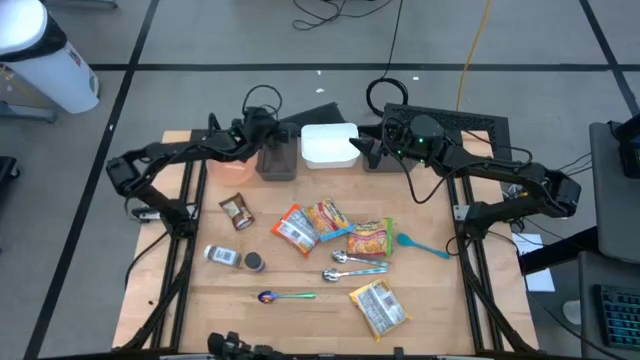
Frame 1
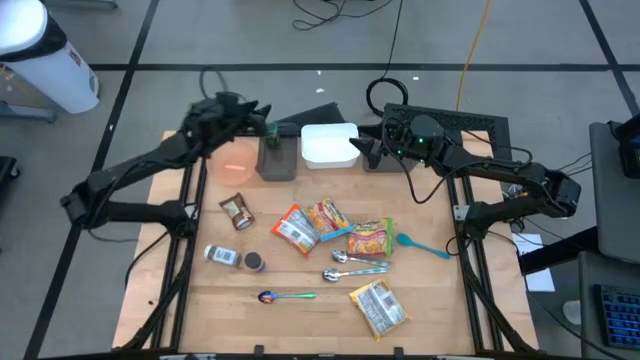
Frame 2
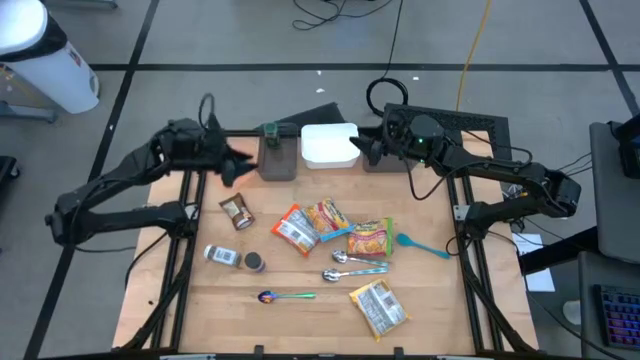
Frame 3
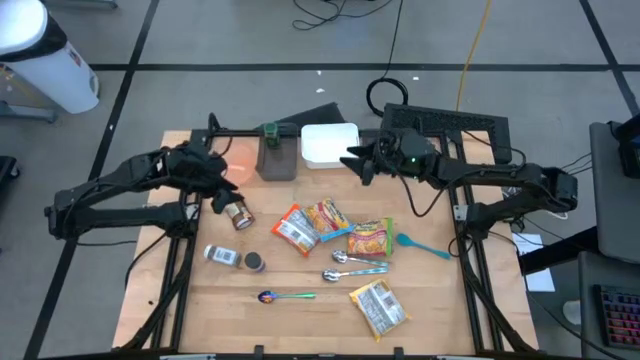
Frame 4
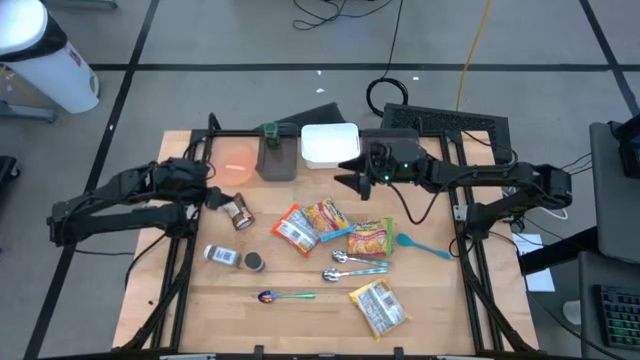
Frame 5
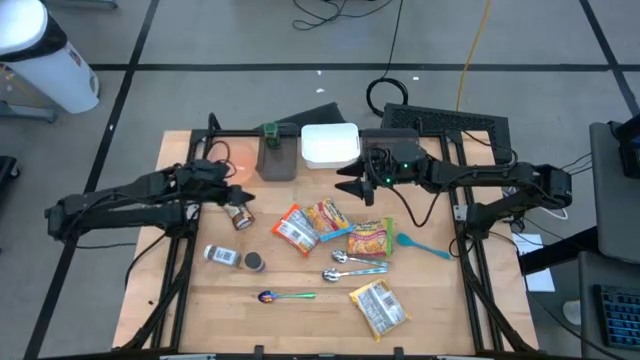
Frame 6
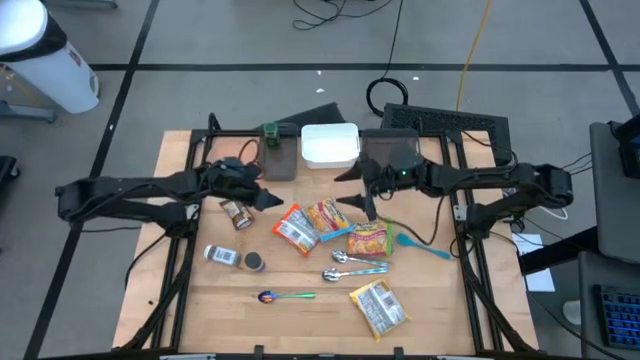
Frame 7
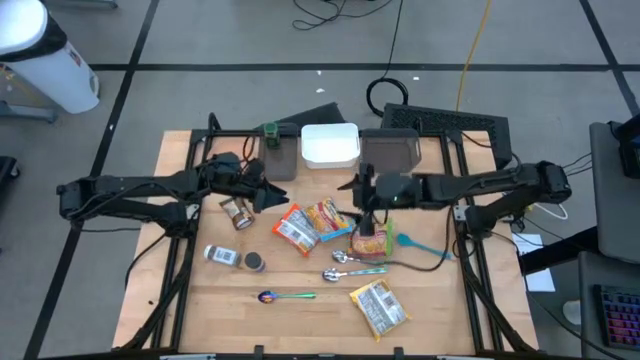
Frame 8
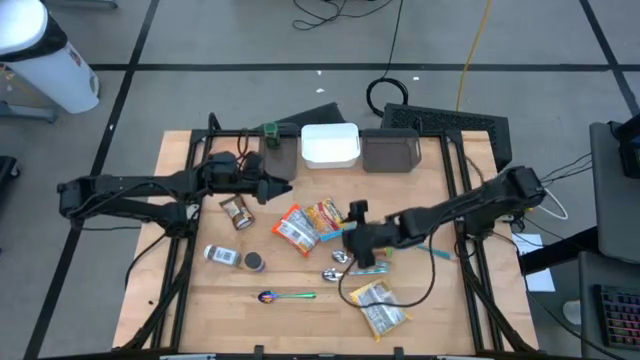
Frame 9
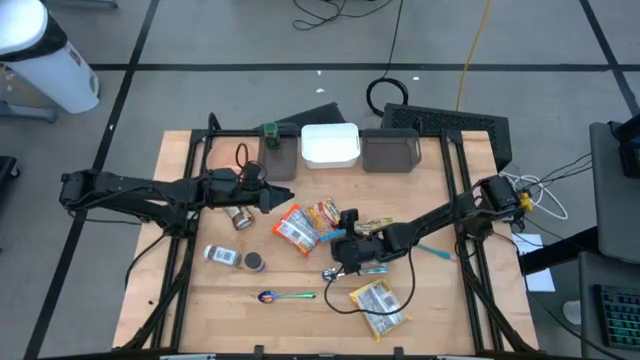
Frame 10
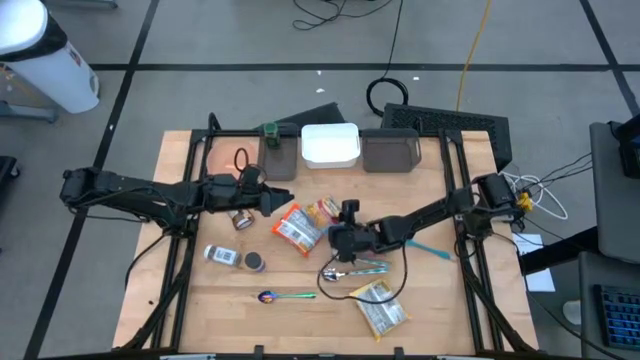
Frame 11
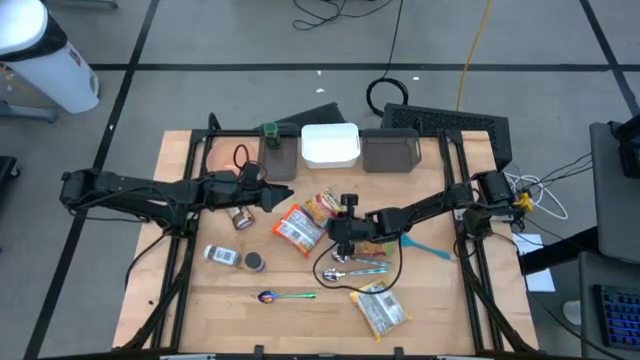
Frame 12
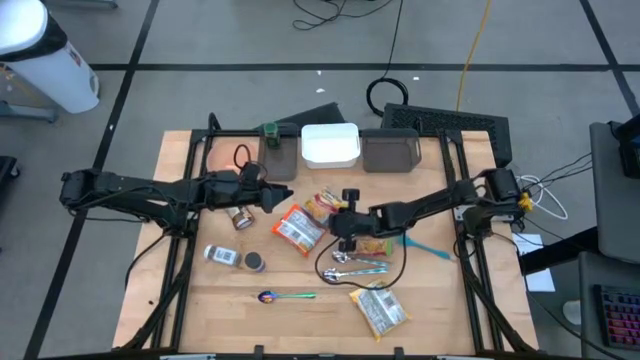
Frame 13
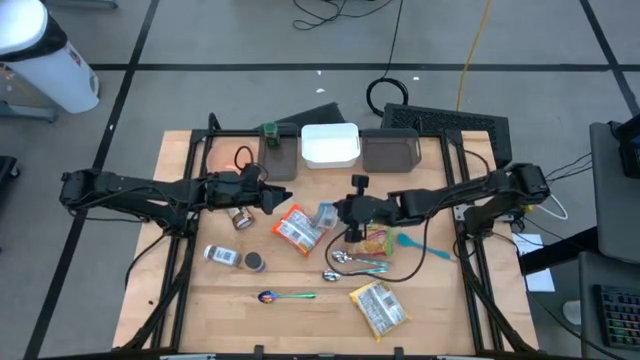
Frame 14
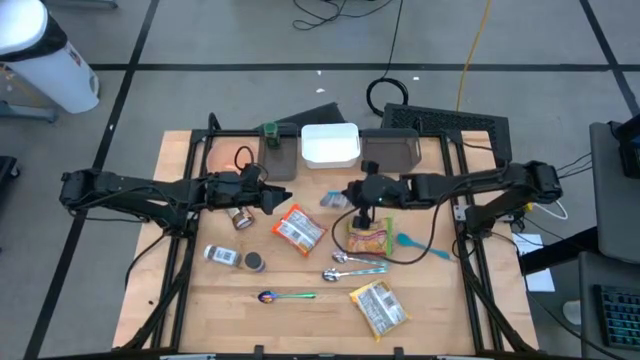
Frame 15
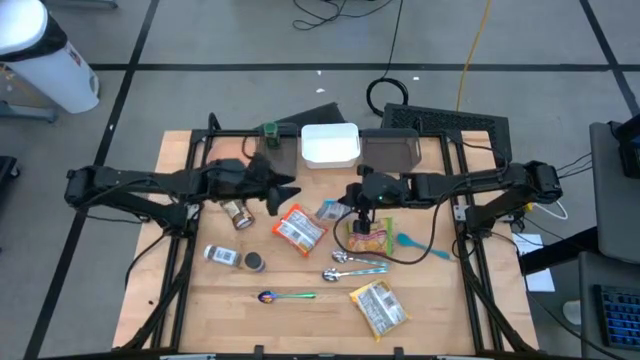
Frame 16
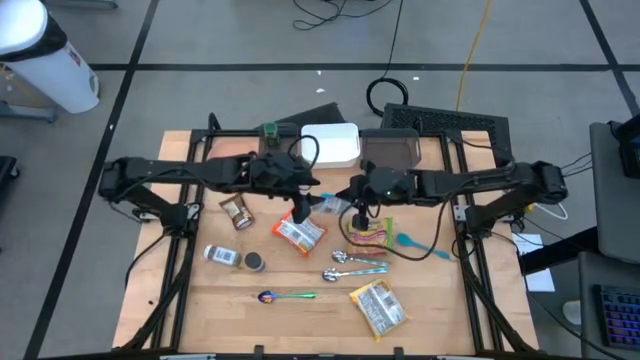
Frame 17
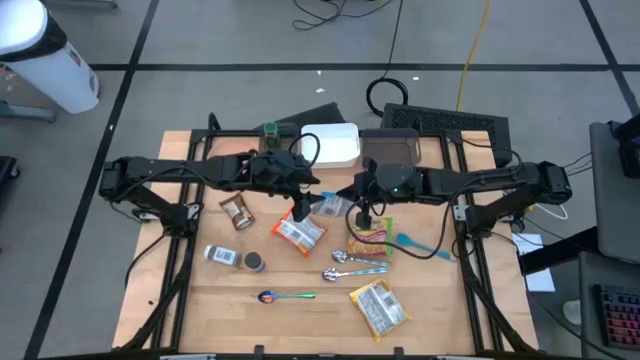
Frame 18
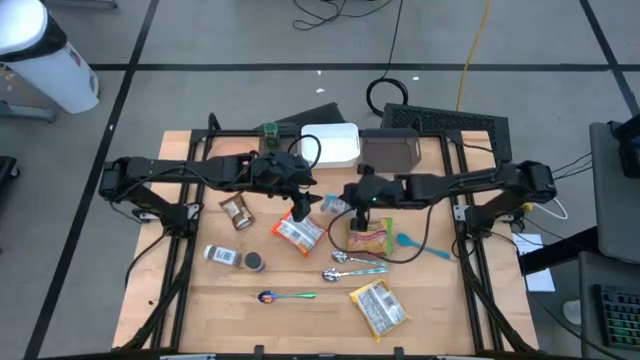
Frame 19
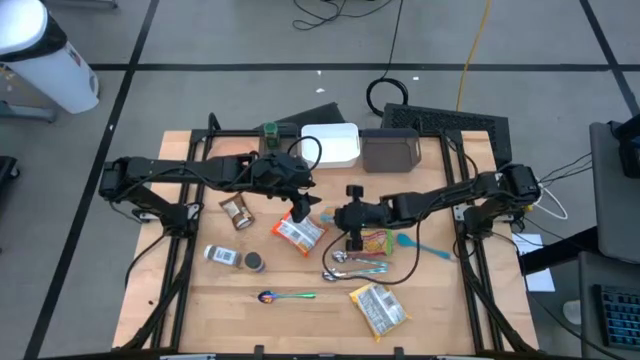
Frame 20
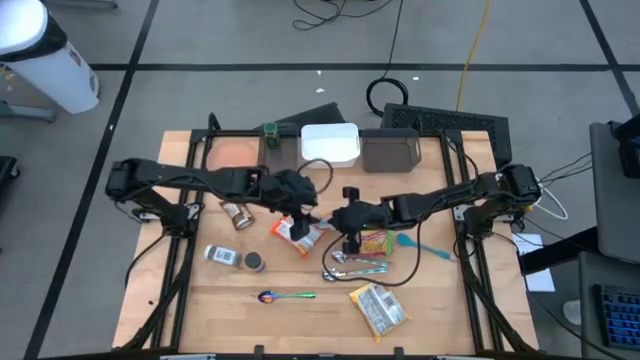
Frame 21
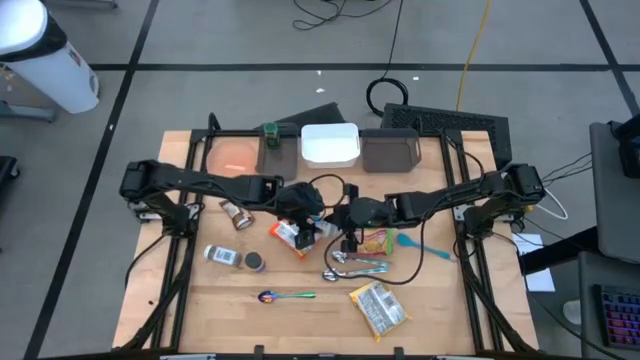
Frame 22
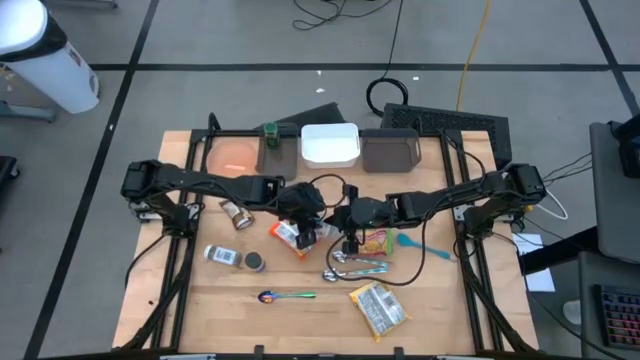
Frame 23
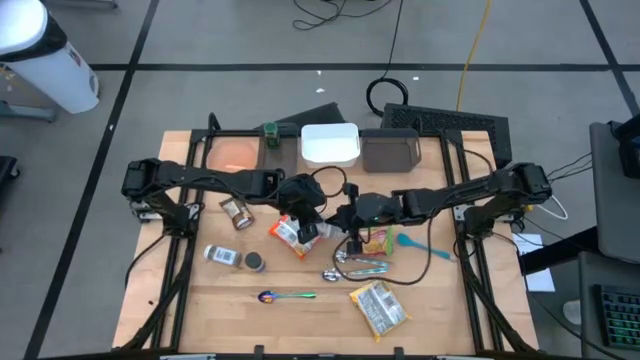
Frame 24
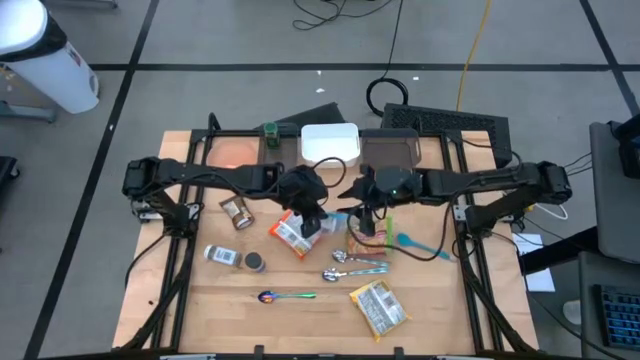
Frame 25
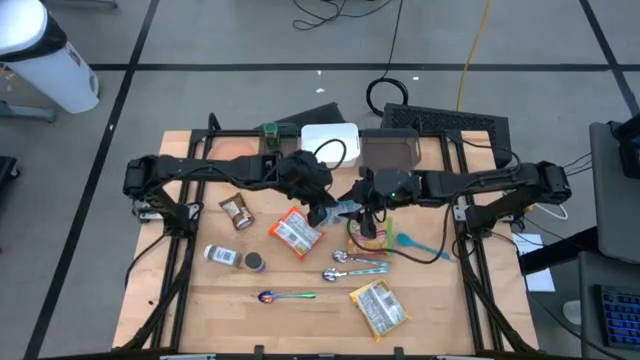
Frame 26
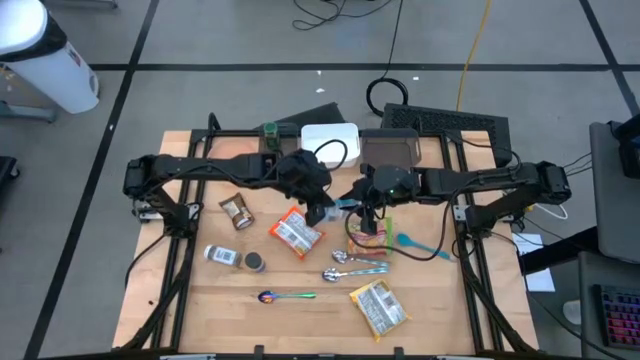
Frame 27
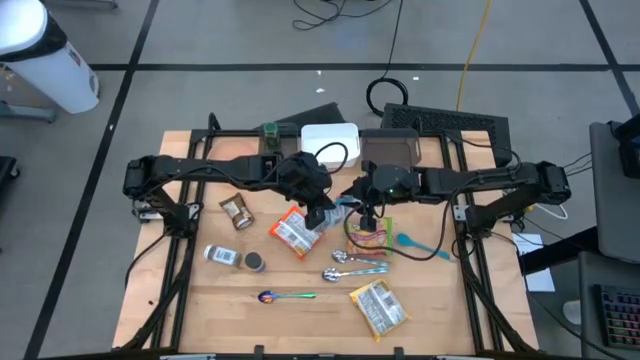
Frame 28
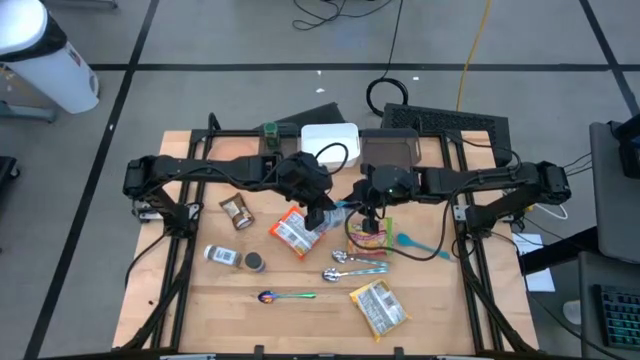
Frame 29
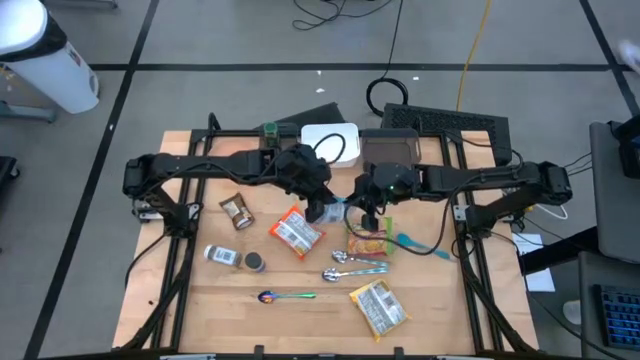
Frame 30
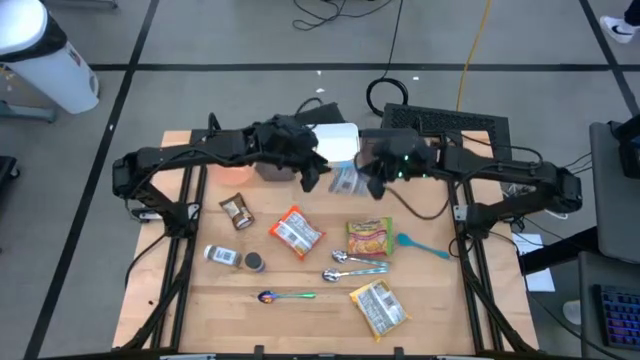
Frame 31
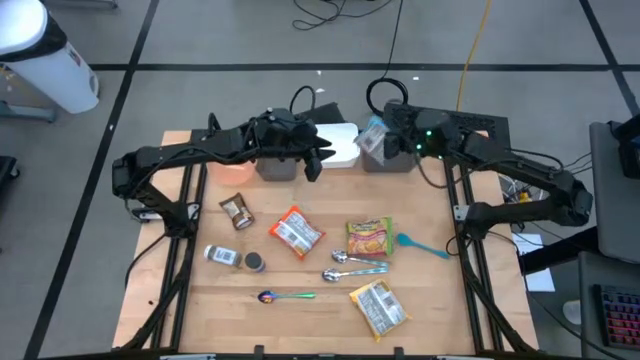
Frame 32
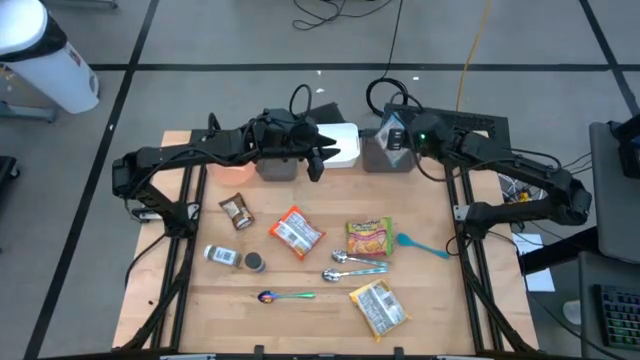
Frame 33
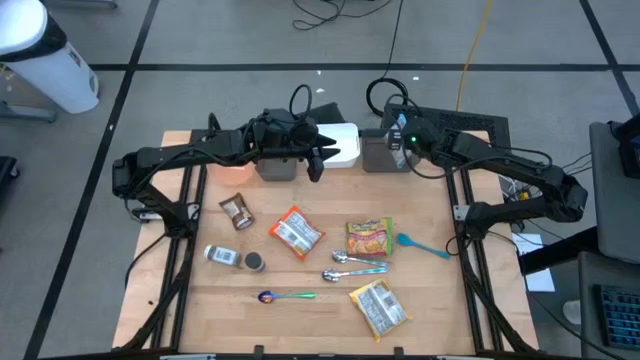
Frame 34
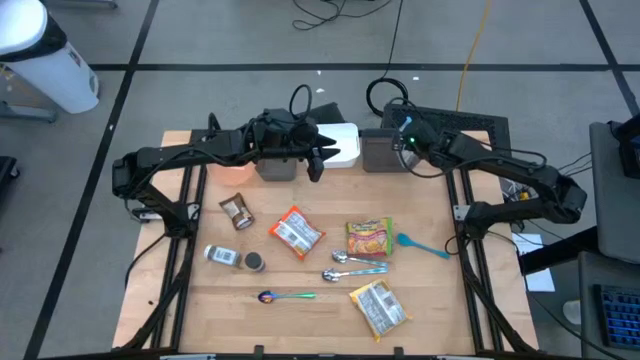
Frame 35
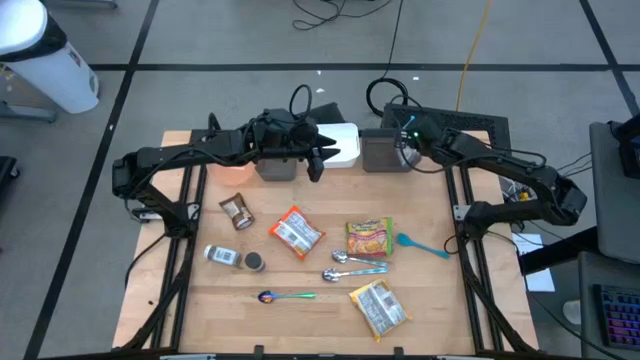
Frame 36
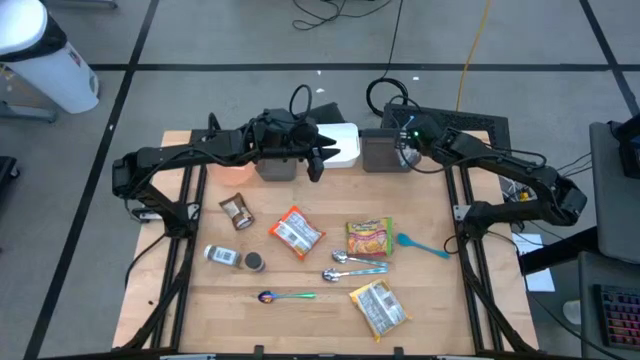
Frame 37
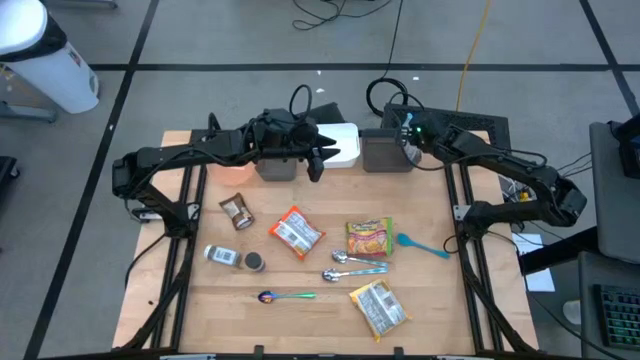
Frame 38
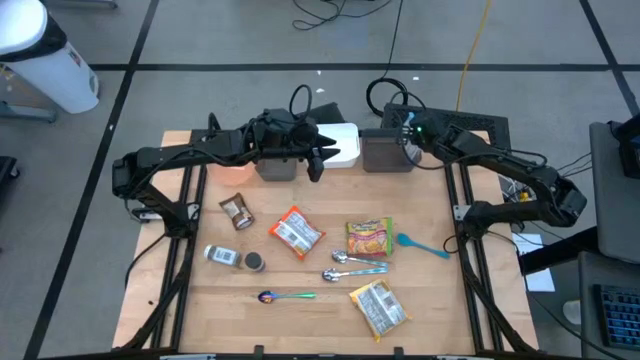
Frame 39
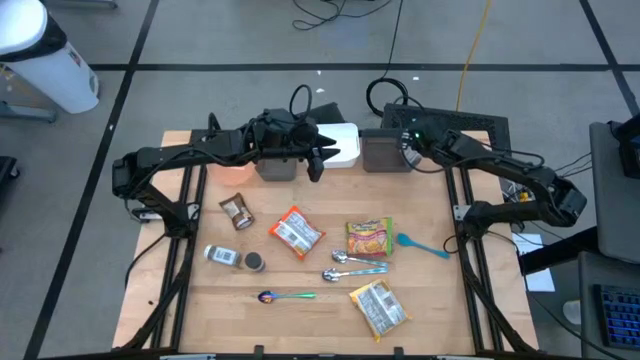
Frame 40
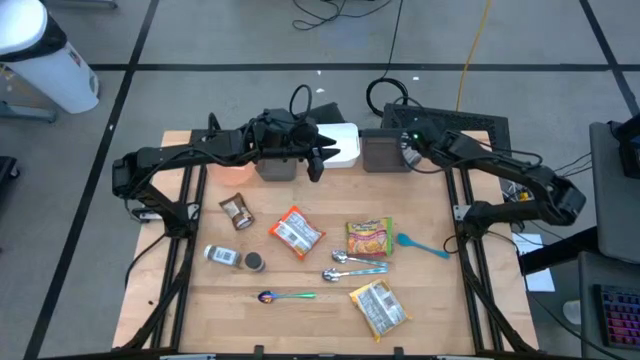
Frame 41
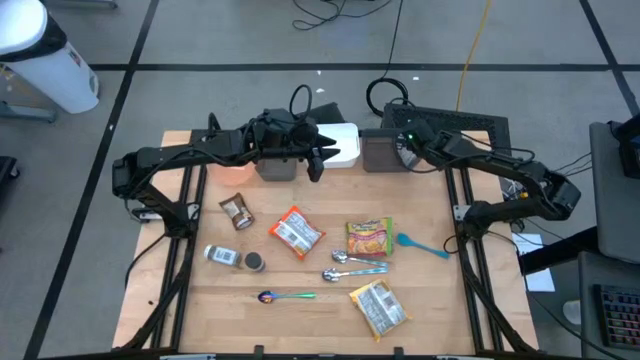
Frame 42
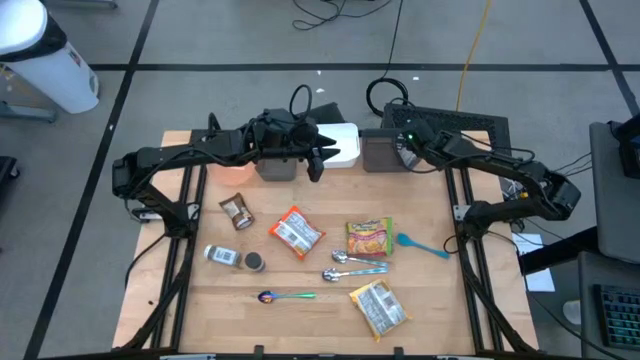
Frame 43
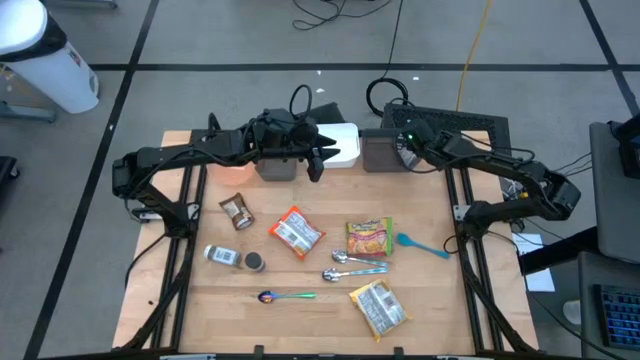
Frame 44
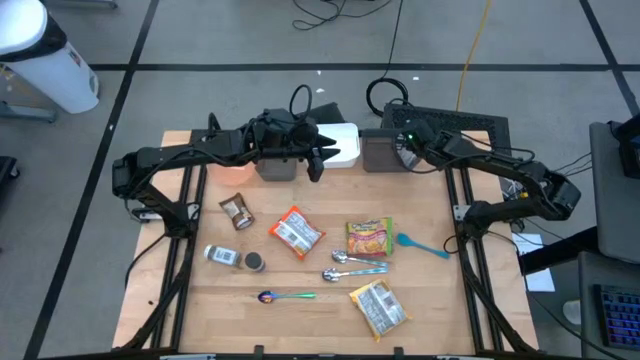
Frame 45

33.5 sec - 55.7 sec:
Task: Pick & Place Food Item
Put the blue noodle pack into the right black bin
